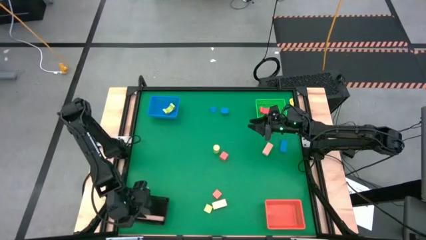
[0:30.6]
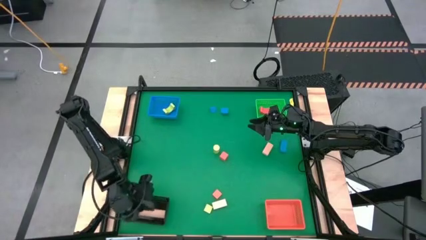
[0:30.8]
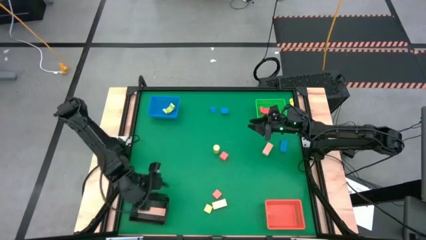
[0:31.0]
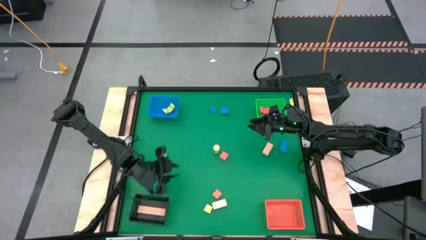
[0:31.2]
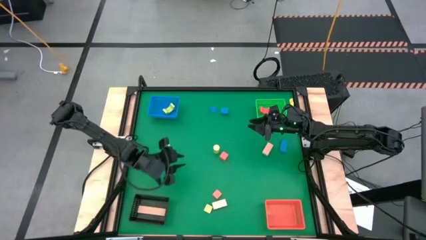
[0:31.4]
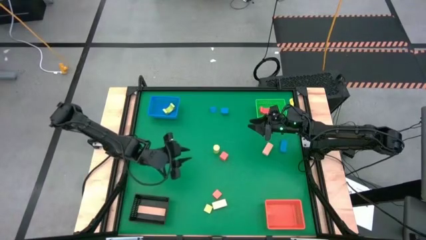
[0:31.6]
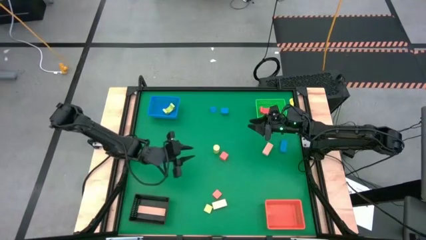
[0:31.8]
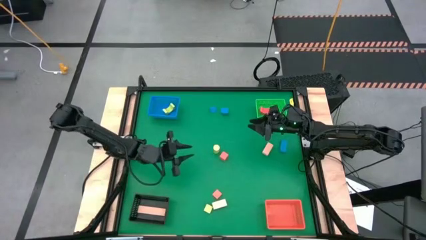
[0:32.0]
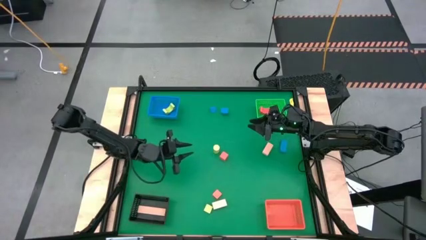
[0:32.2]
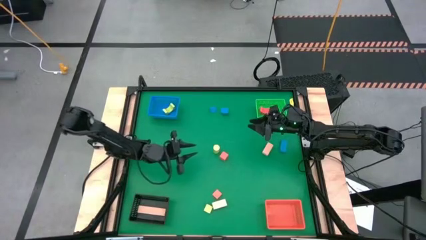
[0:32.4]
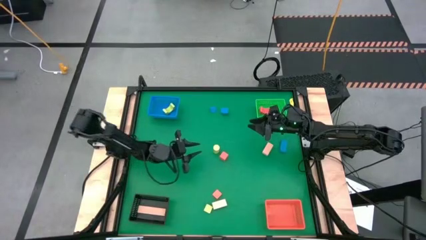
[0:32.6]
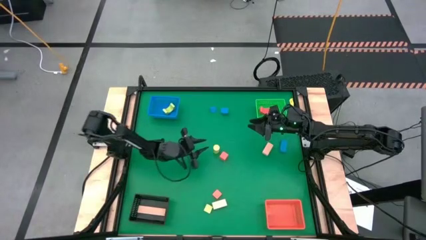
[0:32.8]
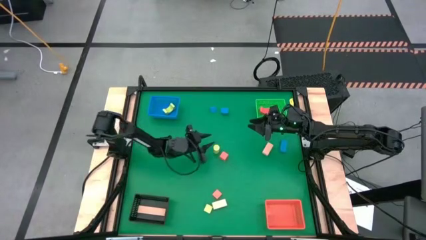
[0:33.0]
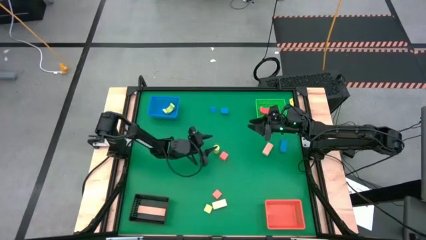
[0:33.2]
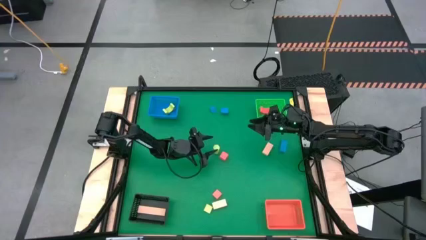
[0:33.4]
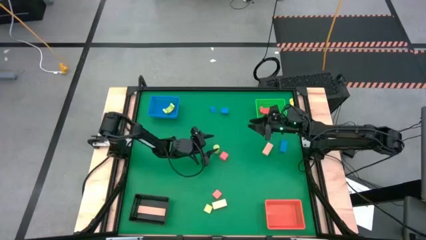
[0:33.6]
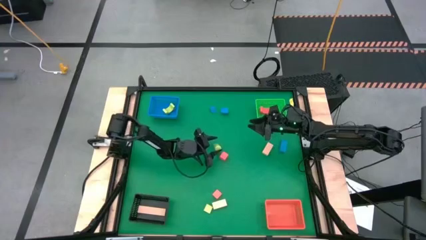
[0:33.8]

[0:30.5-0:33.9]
Task: Sort & place blocks by color
Put the top green block into the blue bin

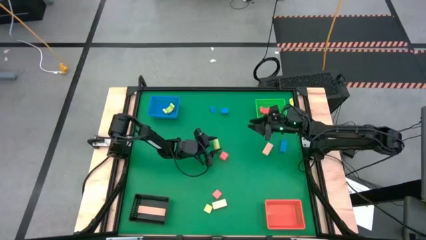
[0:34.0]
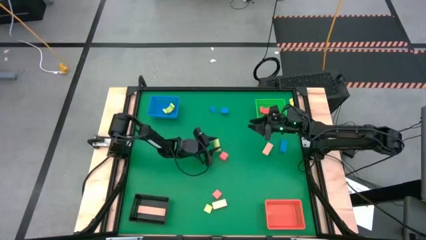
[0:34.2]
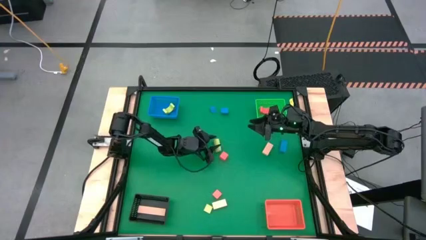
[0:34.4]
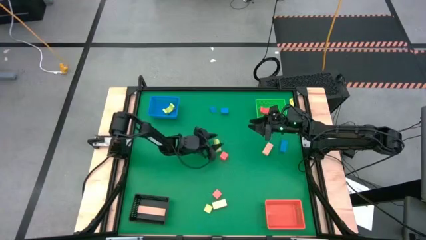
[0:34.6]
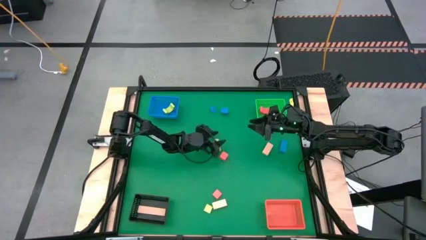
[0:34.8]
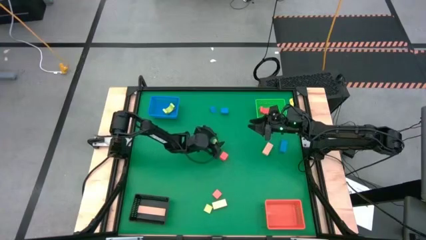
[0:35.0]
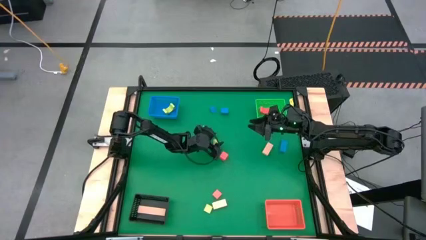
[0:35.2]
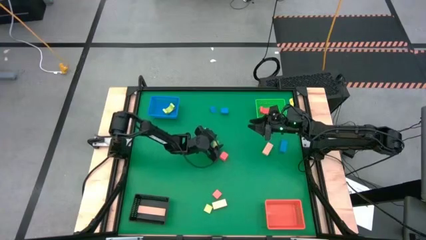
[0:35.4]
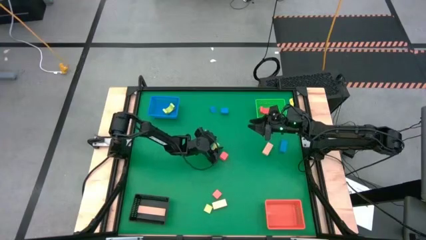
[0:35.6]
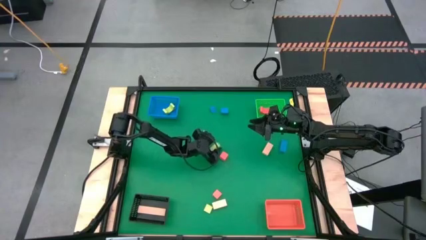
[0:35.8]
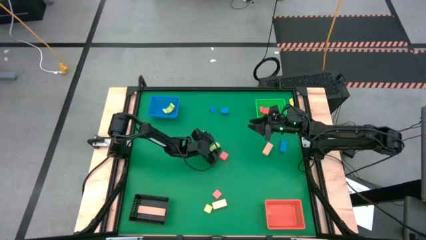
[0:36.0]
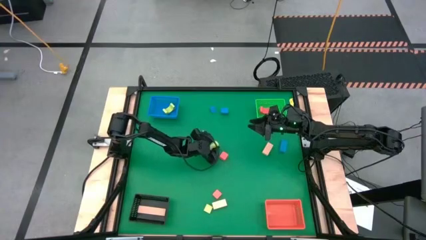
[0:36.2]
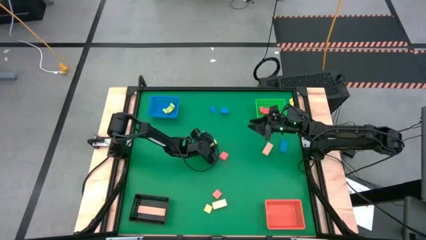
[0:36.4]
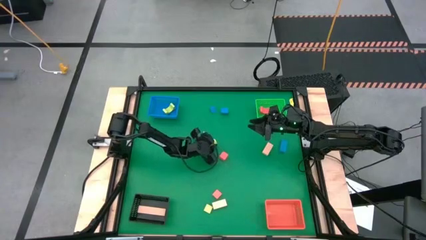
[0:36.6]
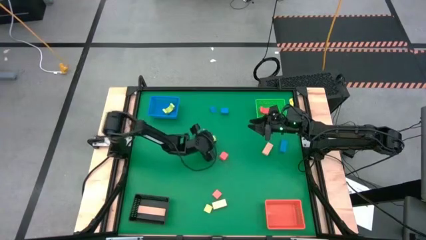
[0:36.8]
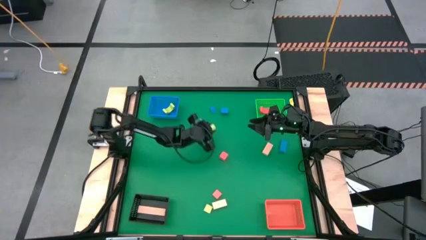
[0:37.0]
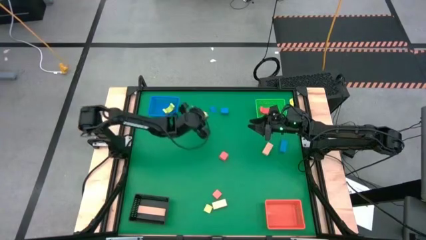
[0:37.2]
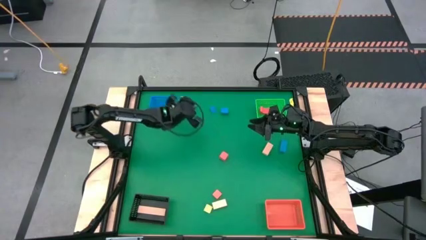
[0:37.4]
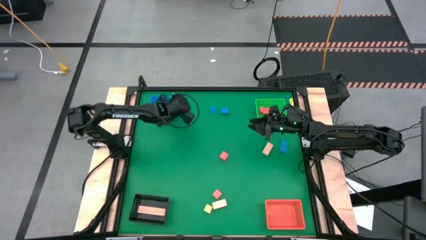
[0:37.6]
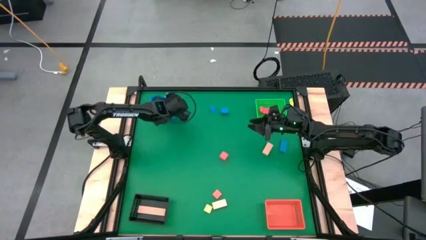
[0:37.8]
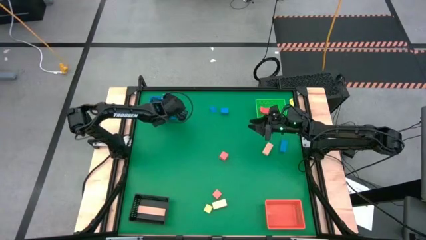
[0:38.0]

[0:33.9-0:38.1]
Put the top green block into the blue bin
